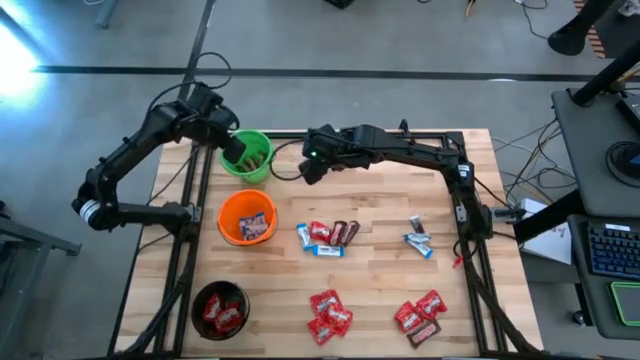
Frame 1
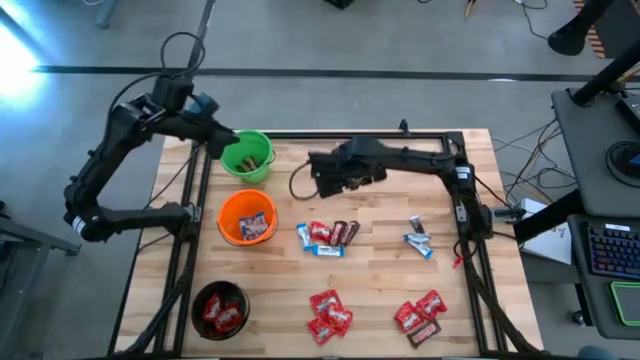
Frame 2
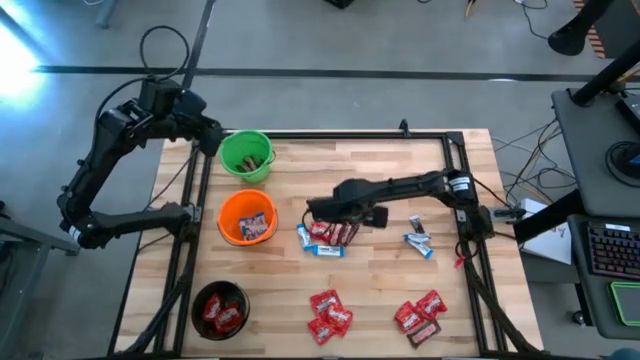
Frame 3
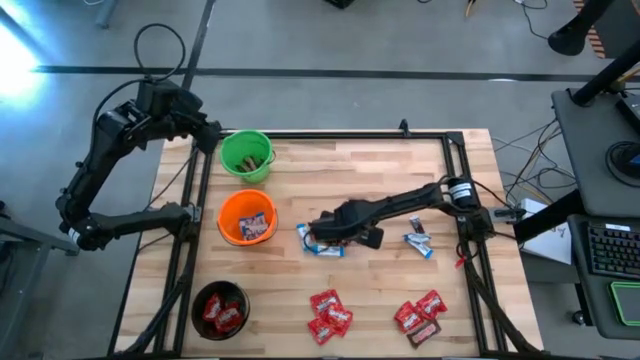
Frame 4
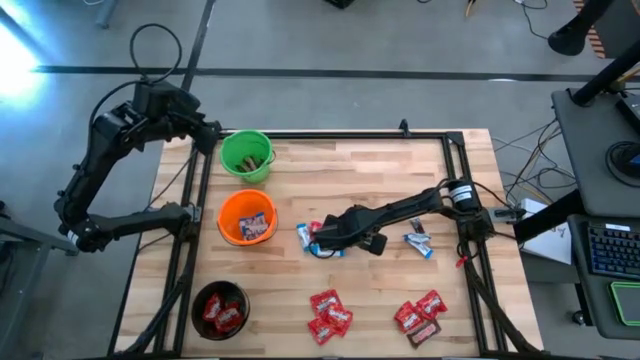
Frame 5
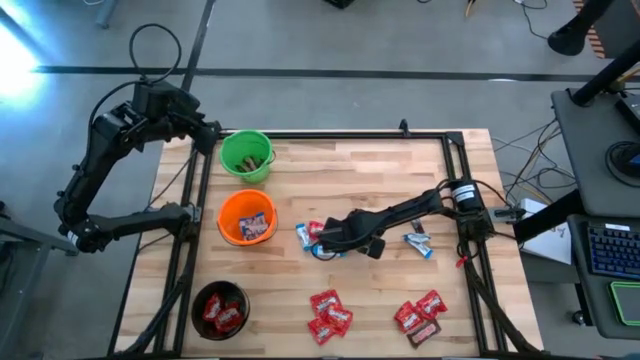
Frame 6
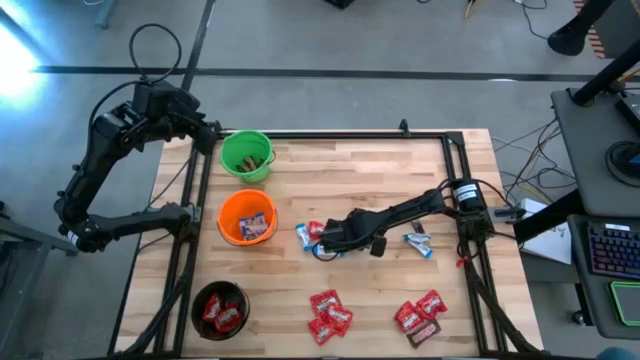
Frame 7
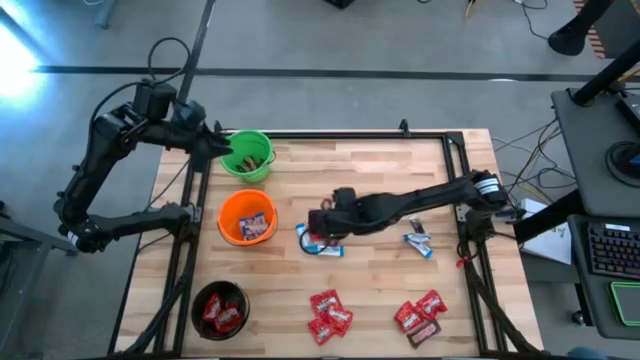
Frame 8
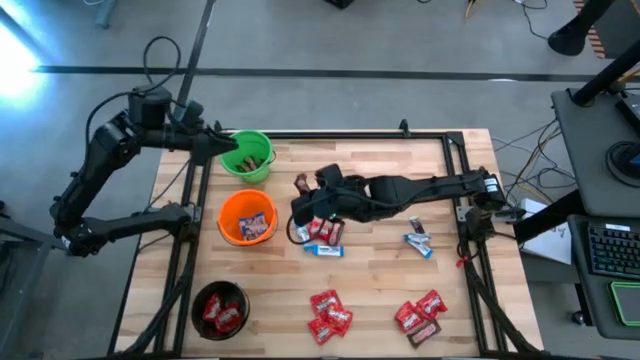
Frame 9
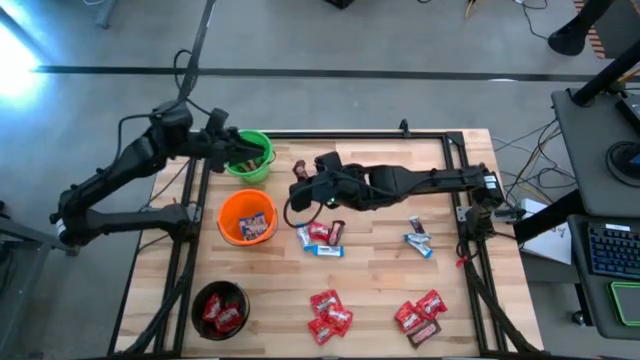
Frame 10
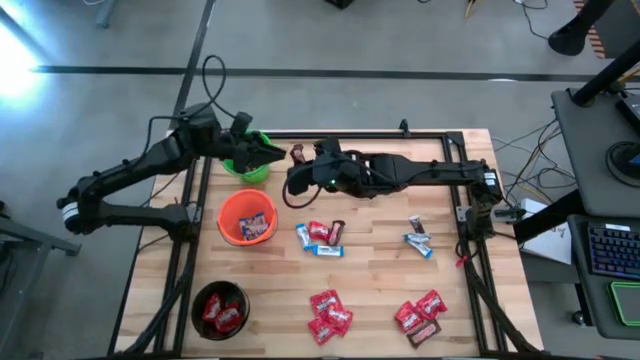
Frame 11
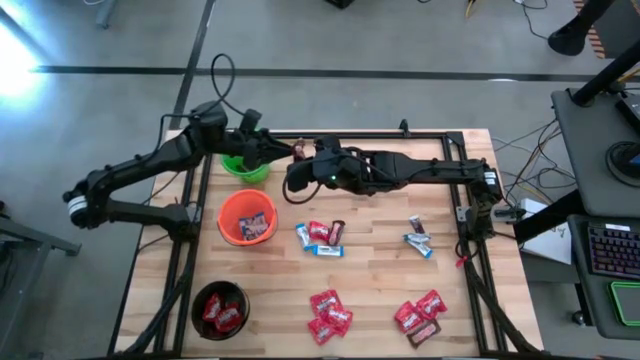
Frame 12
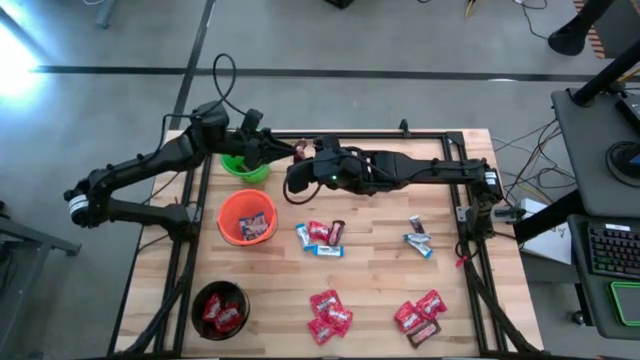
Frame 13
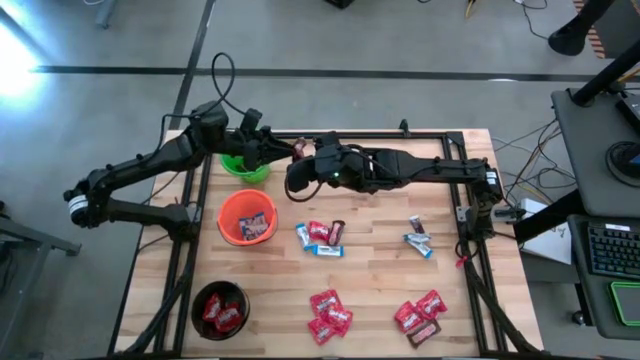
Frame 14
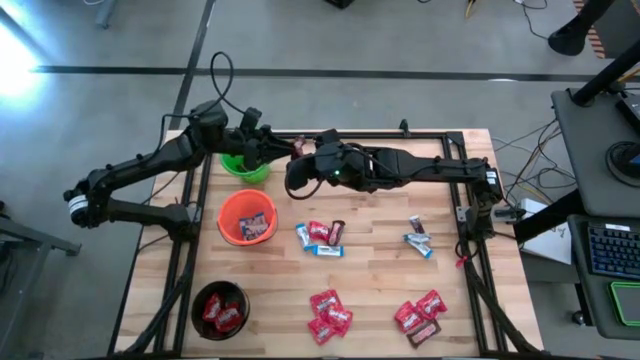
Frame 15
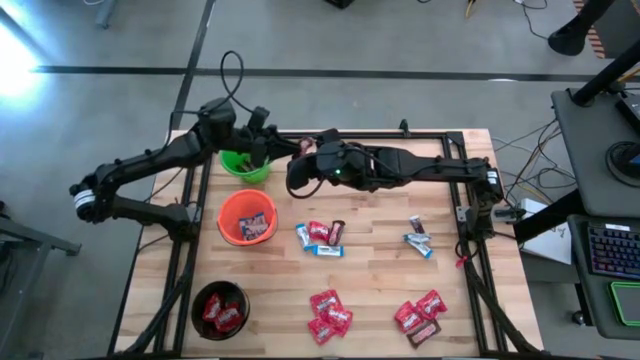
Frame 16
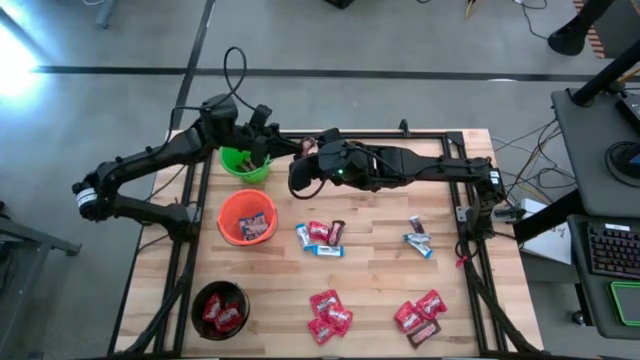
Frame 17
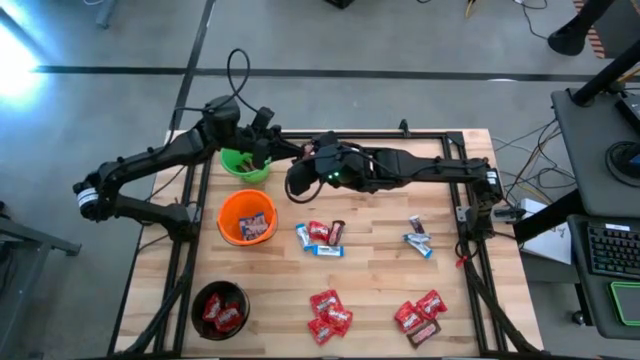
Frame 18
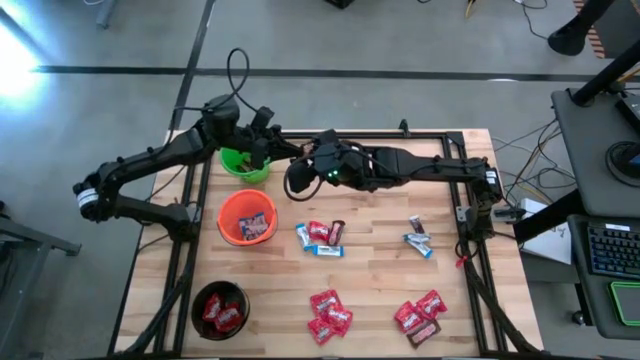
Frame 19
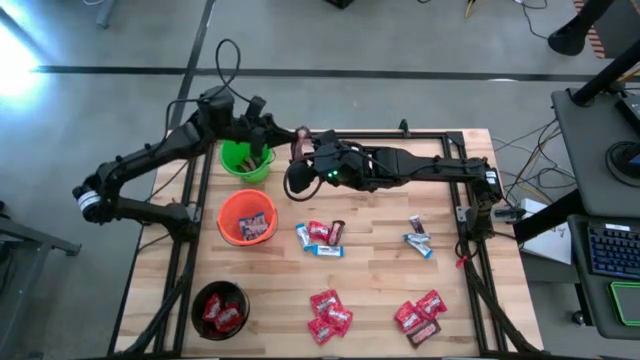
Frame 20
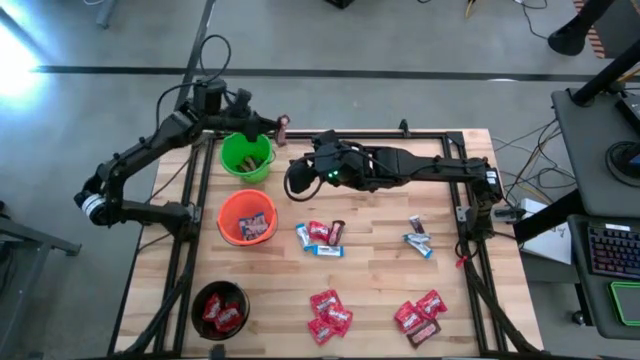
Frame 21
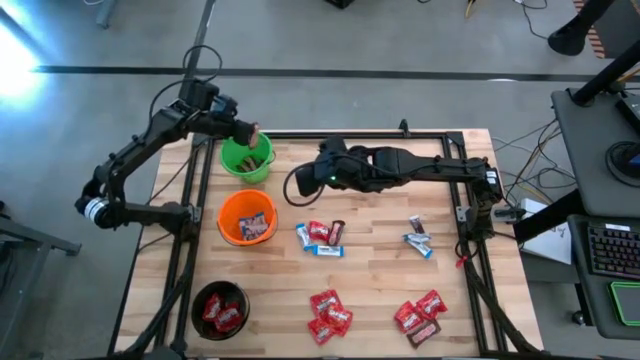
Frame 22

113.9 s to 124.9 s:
Task: Organize candy in baskets
Put the brown chocolate into the green bucket

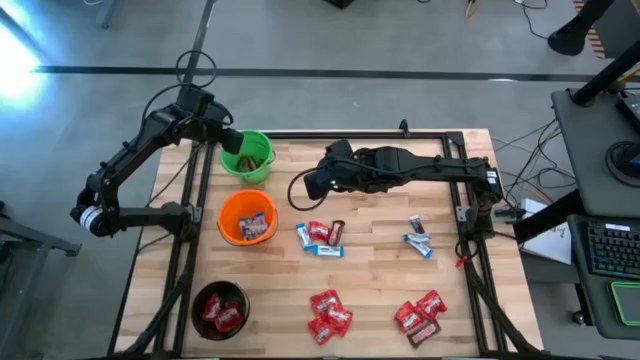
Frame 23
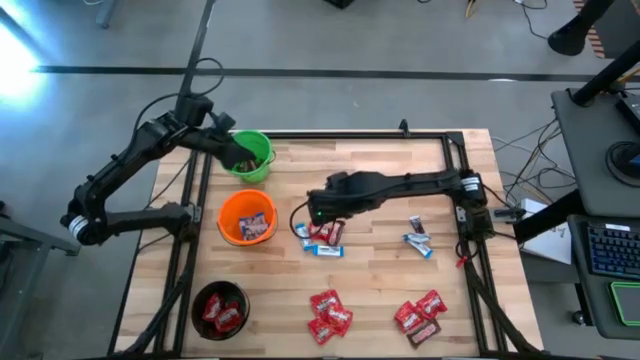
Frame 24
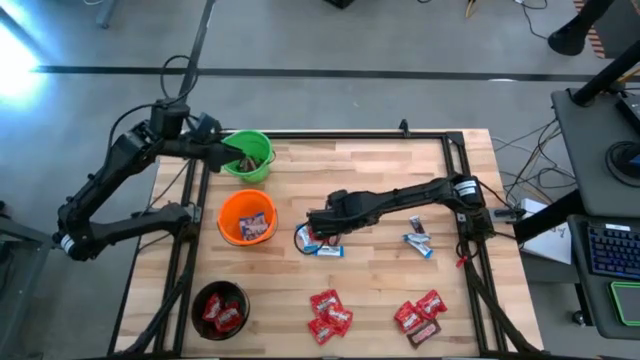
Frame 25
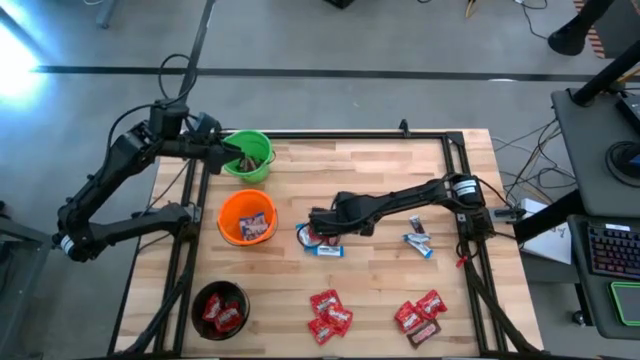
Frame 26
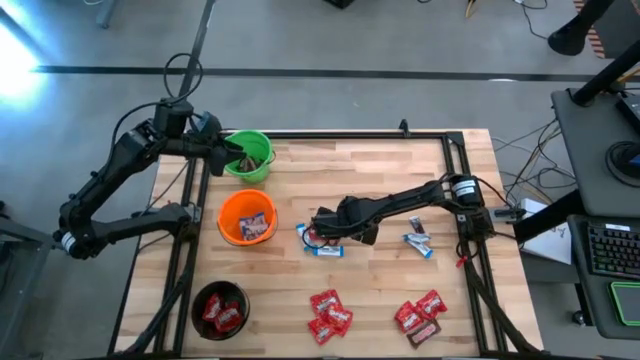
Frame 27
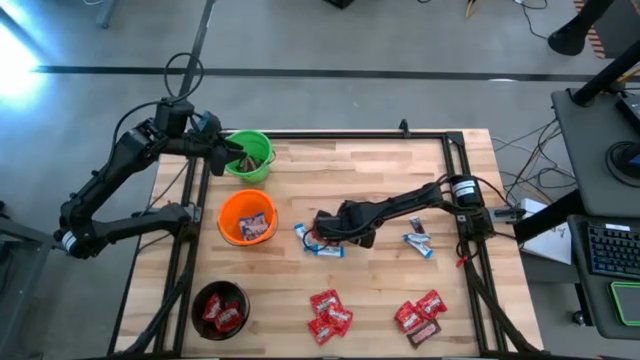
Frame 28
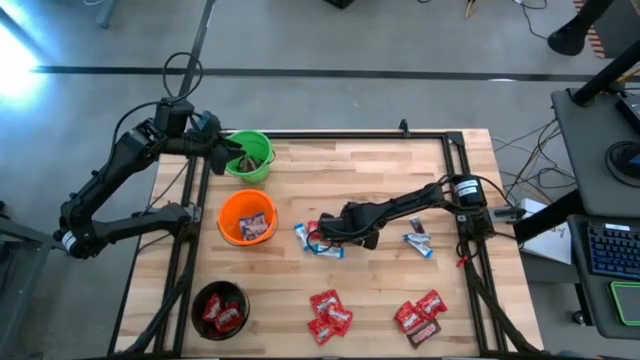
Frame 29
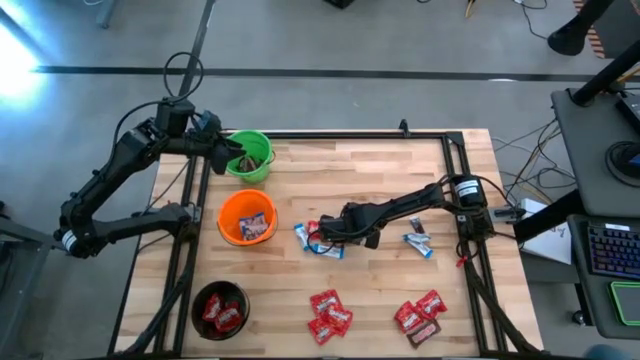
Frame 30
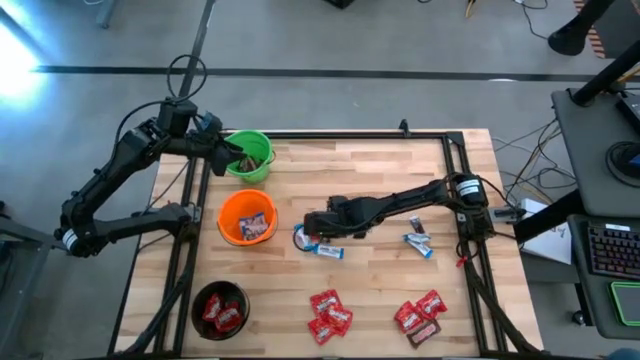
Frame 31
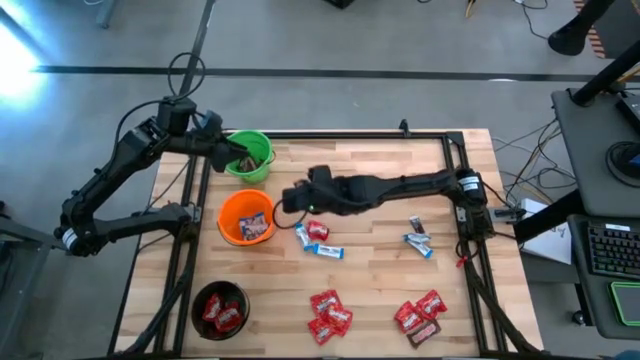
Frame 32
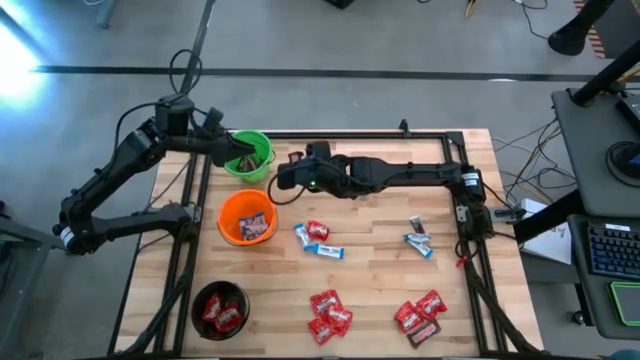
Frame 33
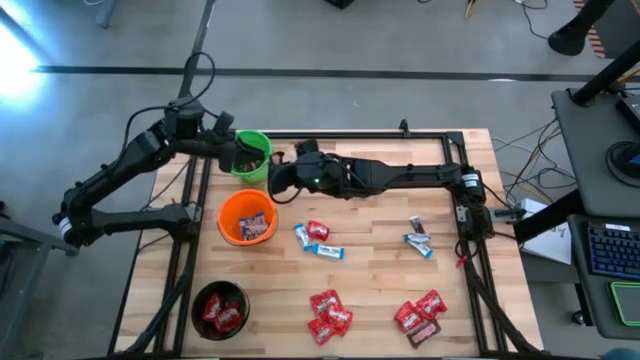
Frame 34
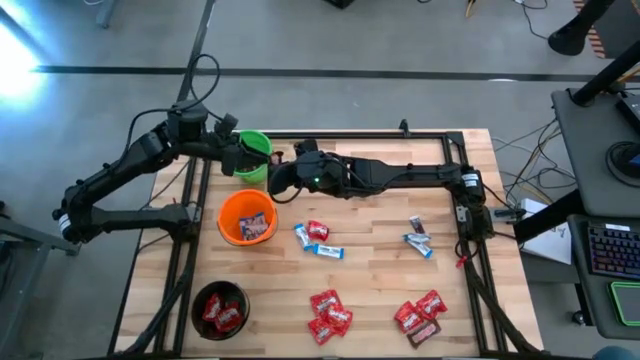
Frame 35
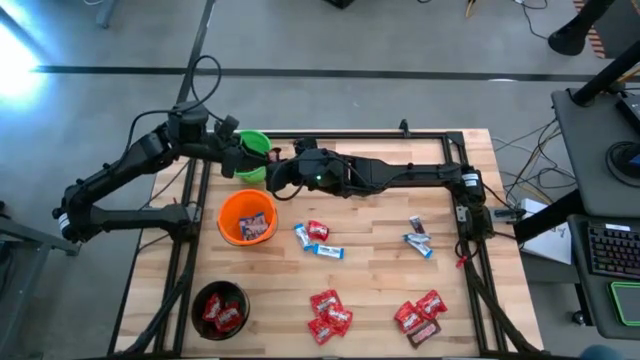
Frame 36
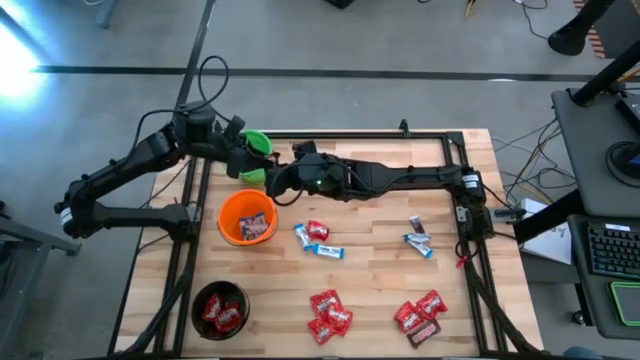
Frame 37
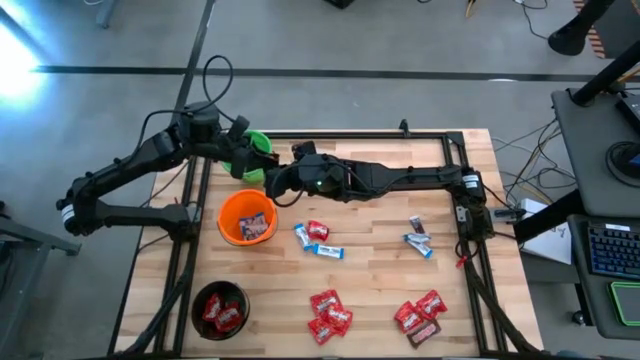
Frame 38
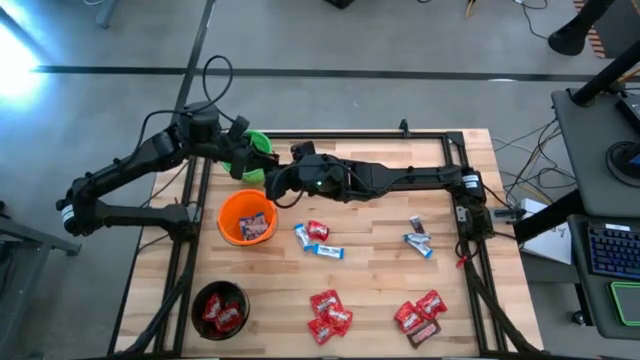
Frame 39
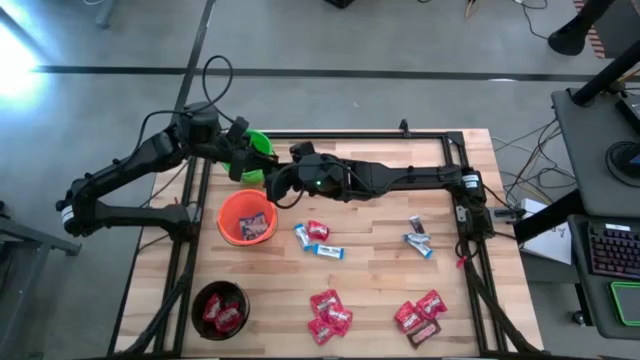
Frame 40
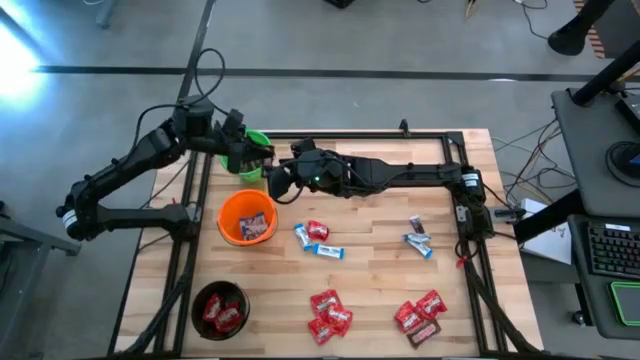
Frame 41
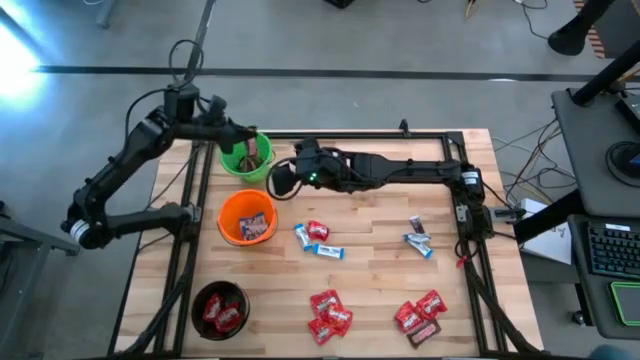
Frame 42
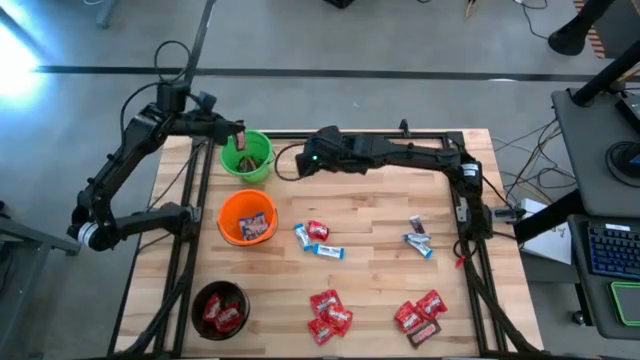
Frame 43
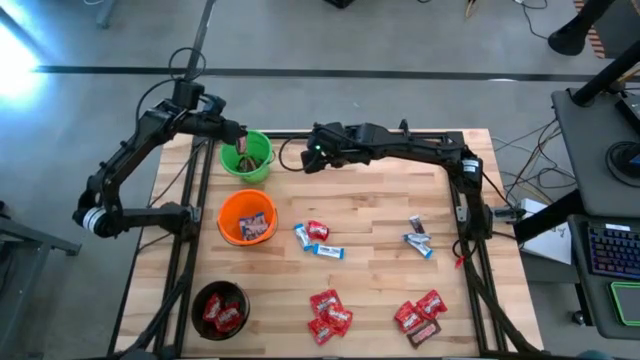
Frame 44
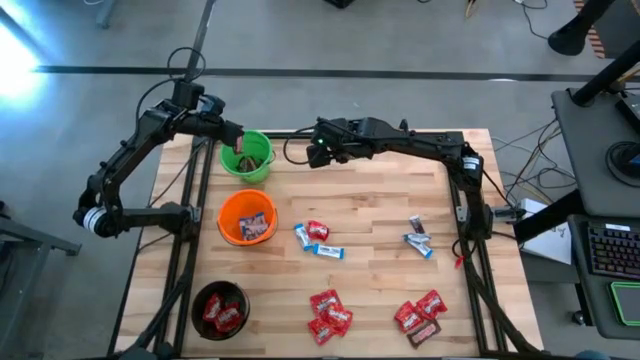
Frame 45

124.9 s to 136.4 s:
Put the brown chocolate into the green bucket
